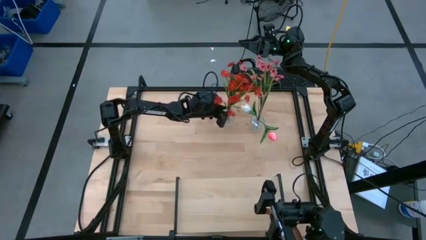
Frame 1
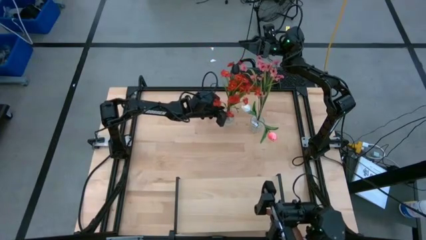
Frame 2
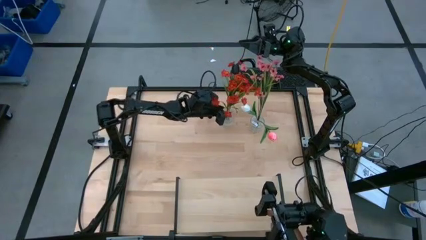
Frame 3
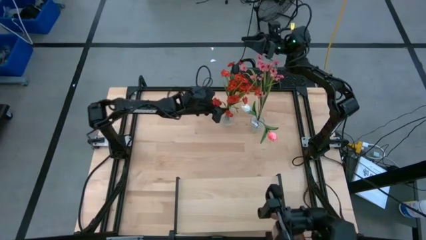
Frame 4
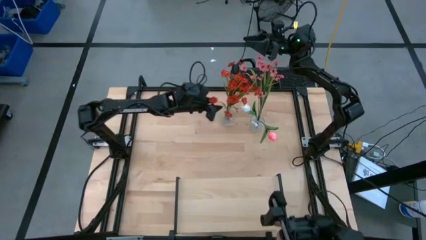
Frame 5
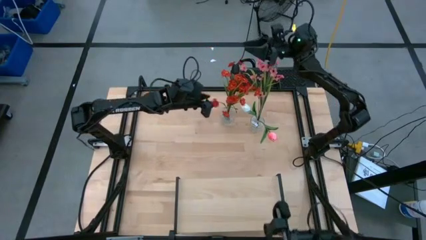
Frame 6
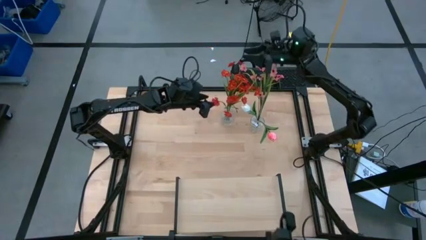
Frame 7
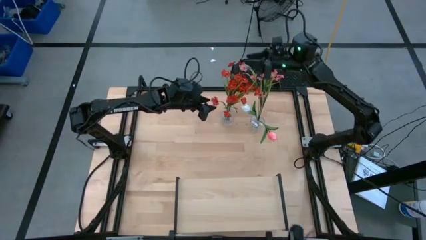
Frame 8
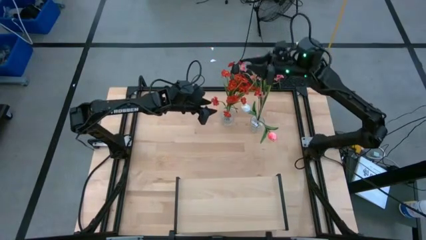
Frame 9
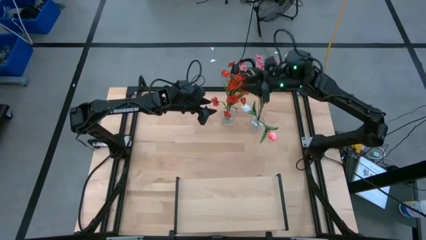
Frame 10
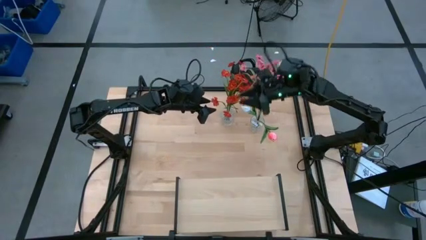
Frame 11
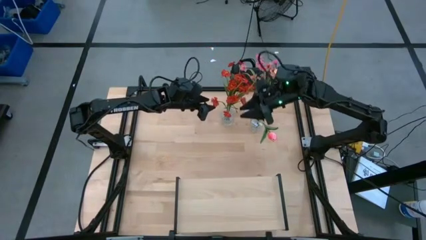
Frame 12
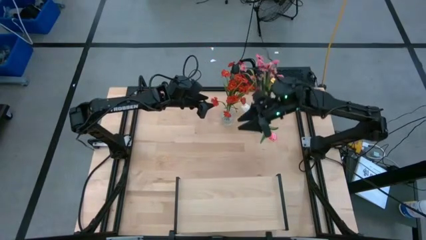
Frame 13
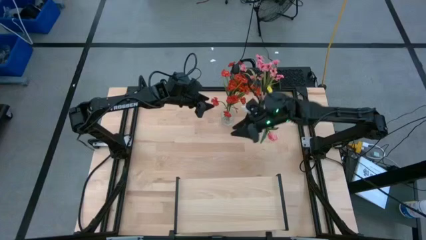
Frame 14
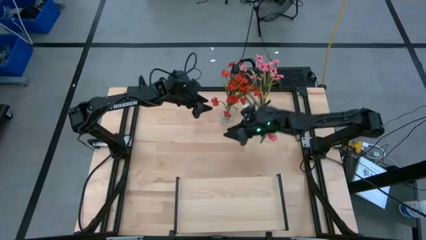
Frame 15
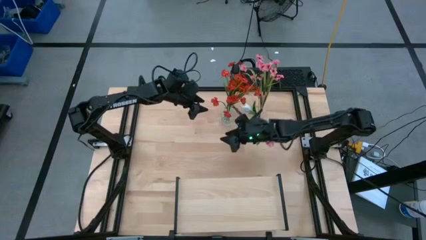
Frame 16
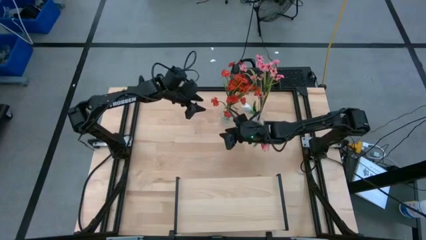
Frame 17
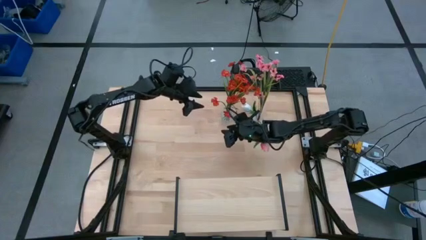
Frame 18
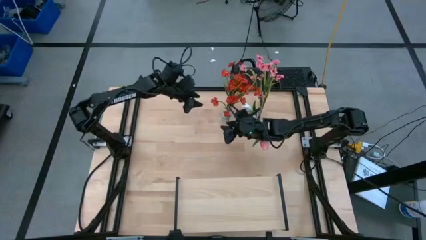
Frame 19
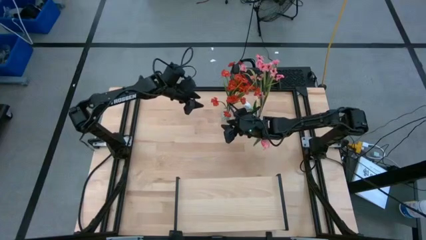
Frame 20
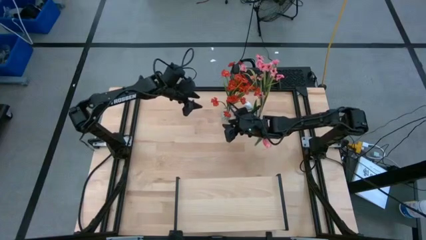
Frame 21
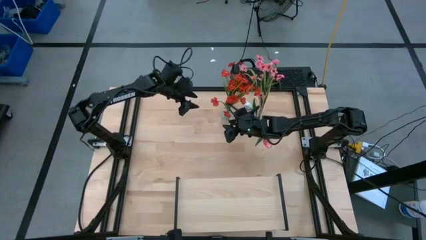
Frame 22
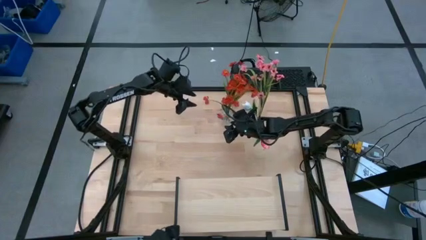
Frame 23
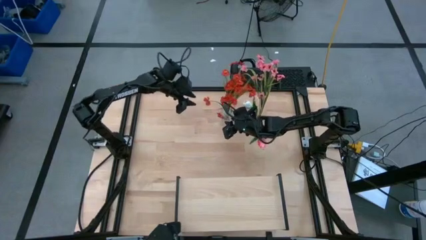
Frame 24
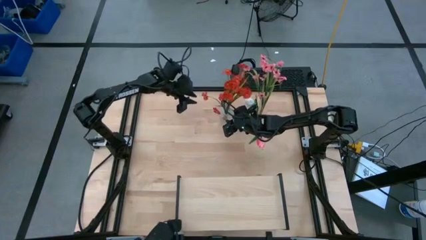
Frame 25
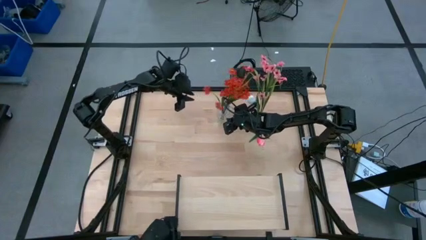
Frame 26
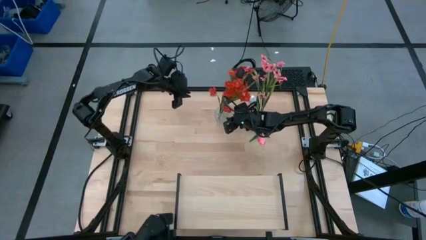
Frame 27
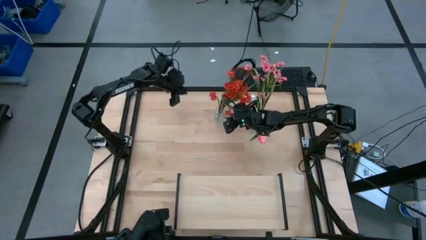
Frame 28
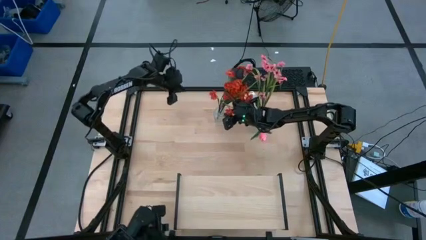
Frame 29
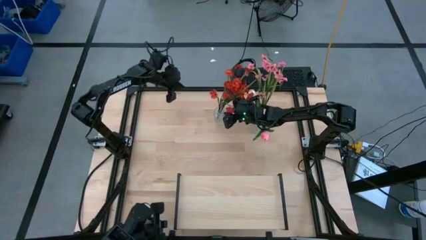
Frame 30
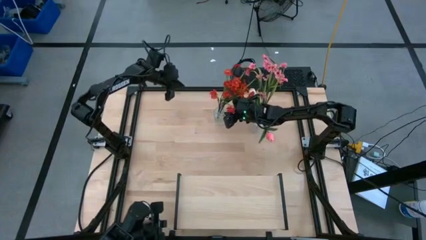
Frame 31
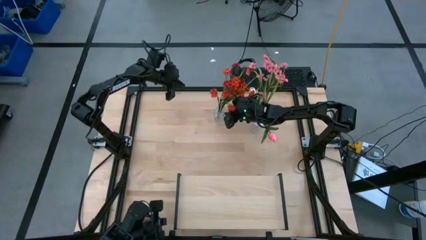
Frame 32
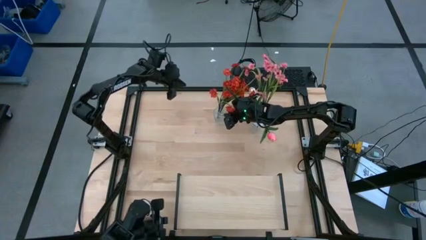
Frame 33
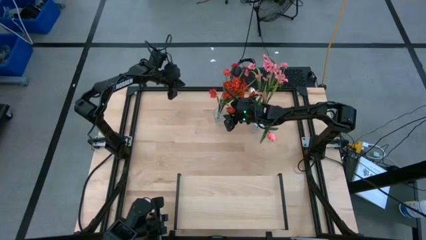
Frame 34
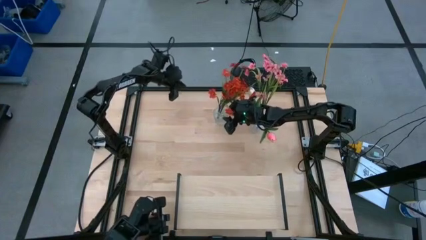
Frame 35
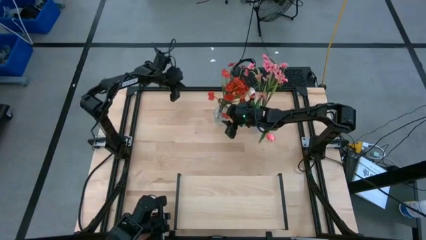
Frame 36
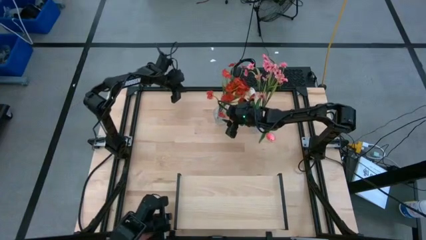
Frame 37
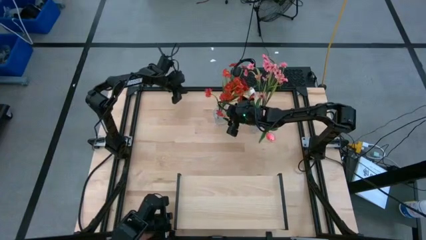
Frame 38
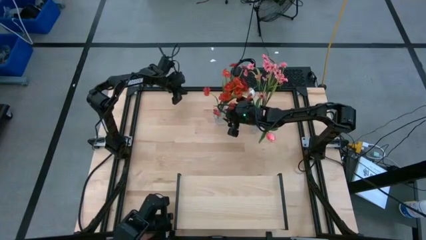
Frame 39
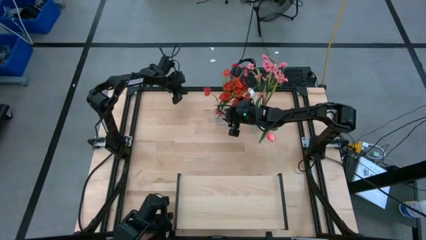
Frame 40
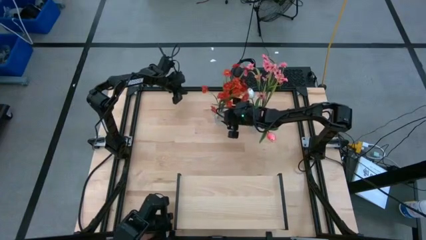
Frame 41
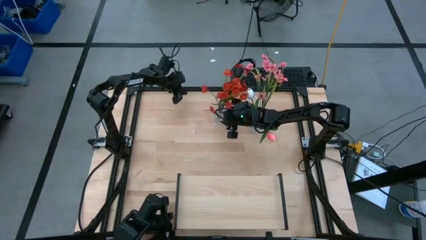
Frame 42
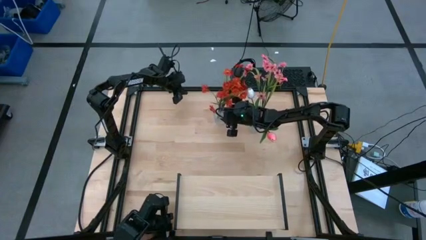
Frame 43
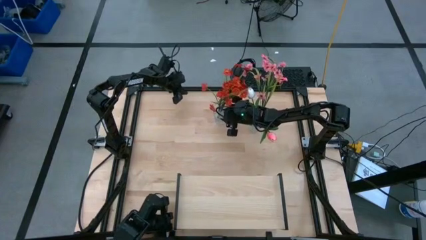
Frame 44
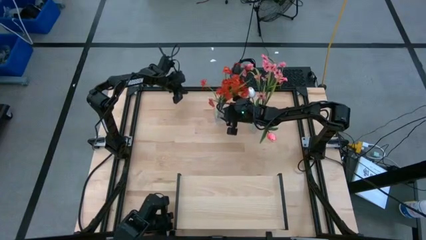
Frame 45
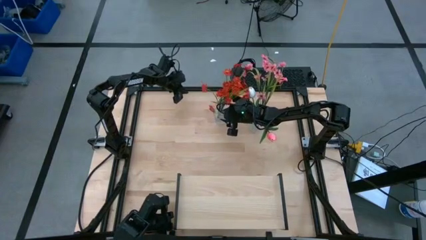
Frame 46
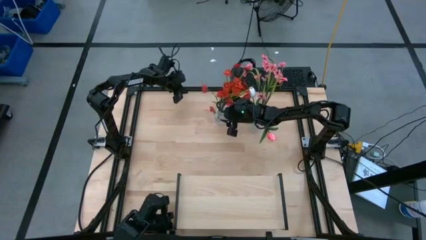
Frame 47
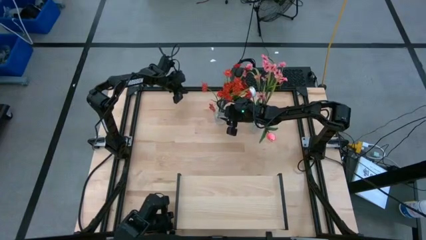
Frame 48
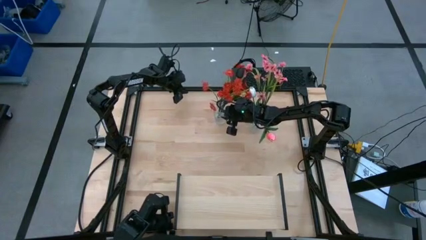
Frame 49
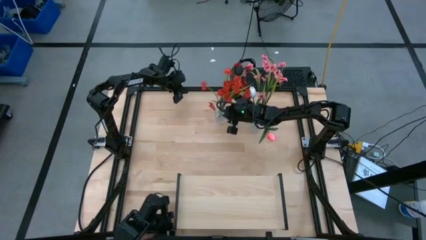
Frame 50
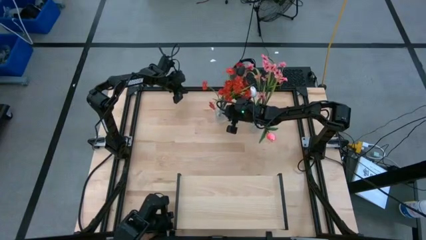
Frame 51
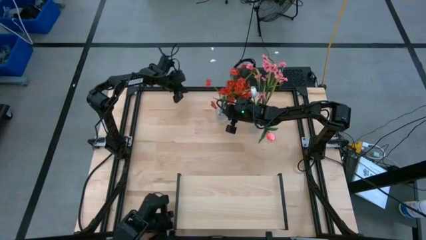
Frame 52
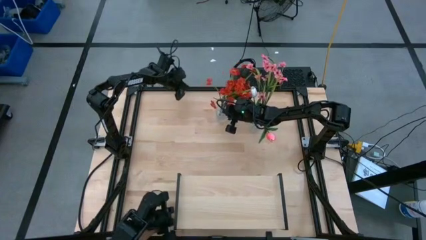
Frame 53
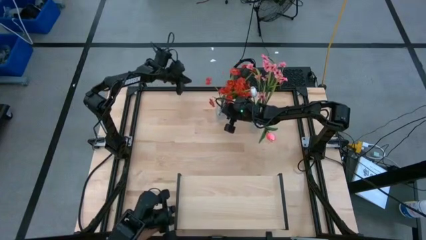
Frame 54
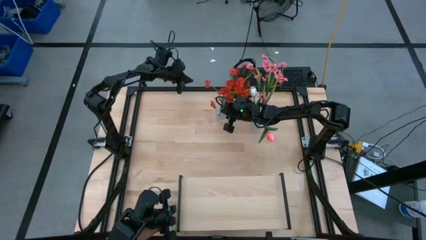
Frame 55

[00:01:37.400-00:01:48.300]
Task: Pick and place flowers into a vace then onto a shelf
Put the left transparent vase with flowers on the shelf
